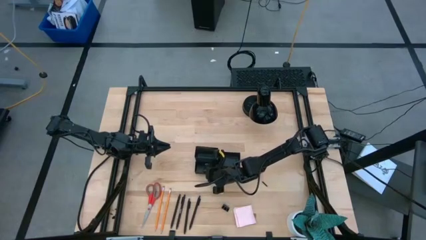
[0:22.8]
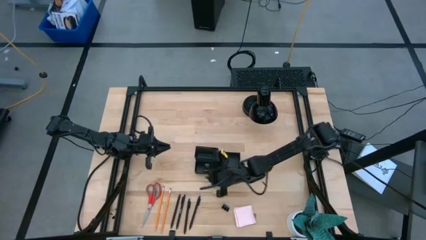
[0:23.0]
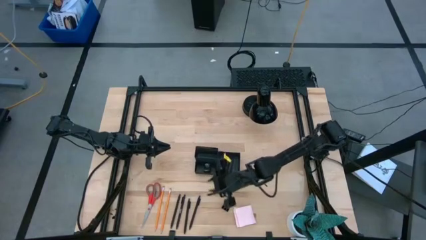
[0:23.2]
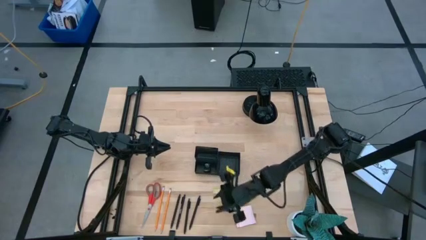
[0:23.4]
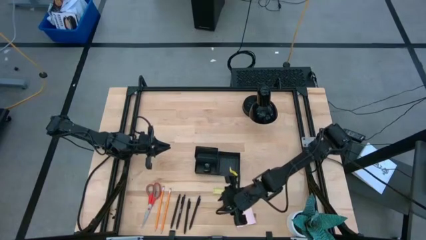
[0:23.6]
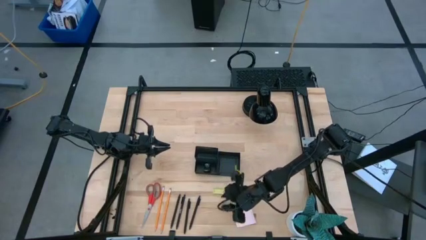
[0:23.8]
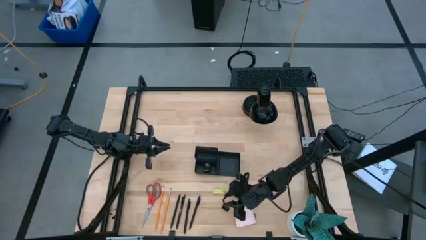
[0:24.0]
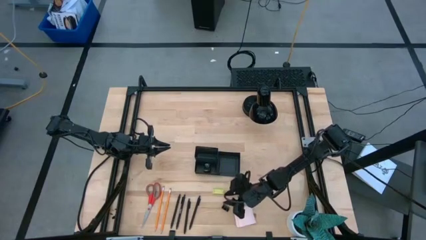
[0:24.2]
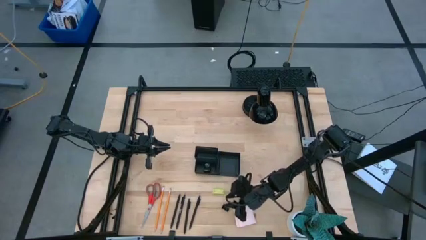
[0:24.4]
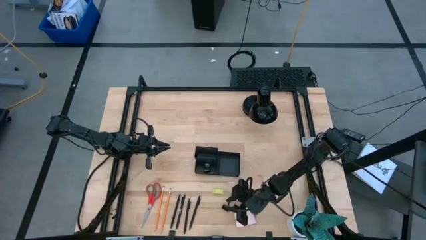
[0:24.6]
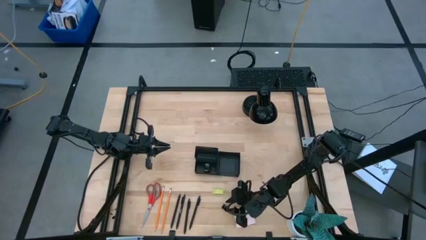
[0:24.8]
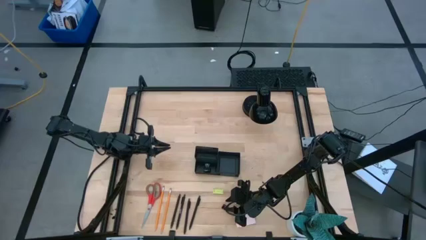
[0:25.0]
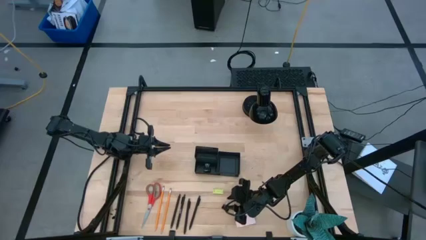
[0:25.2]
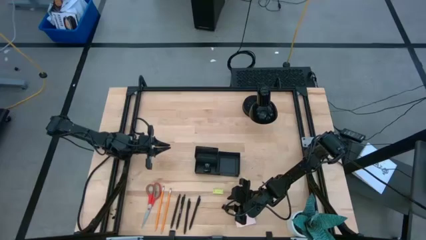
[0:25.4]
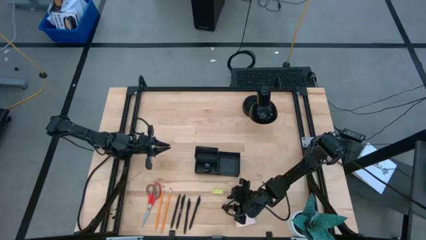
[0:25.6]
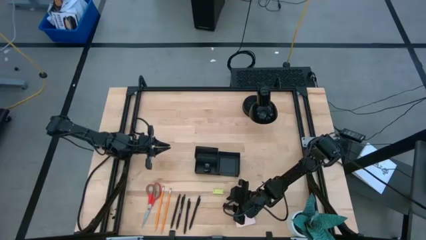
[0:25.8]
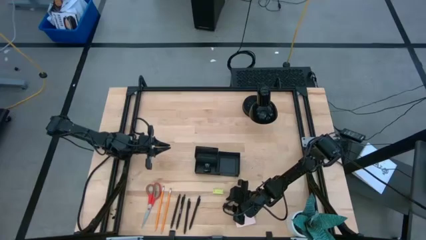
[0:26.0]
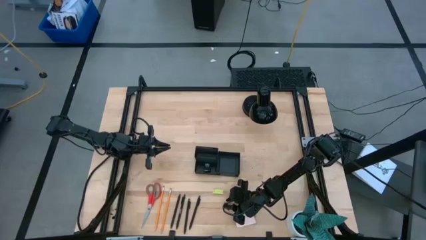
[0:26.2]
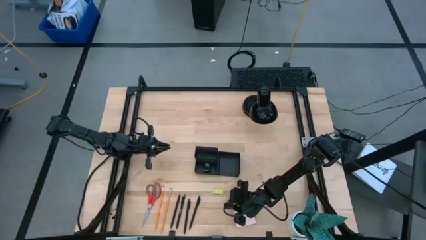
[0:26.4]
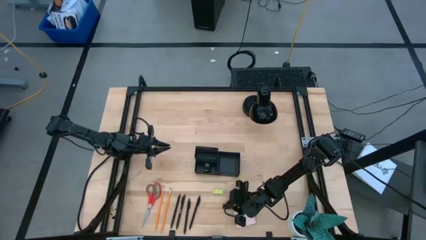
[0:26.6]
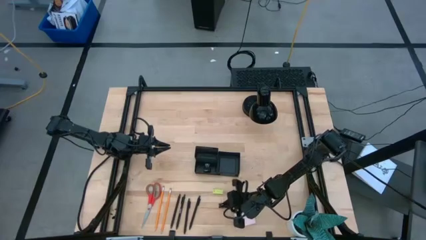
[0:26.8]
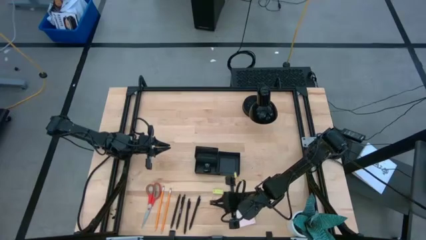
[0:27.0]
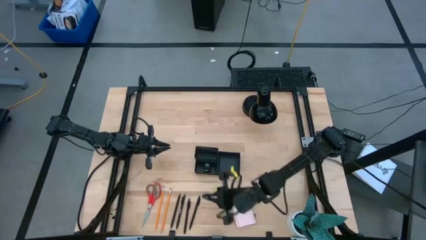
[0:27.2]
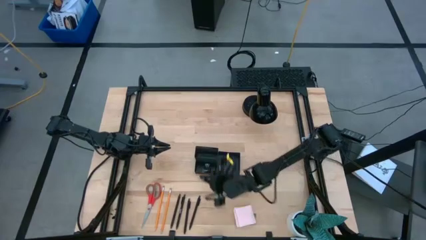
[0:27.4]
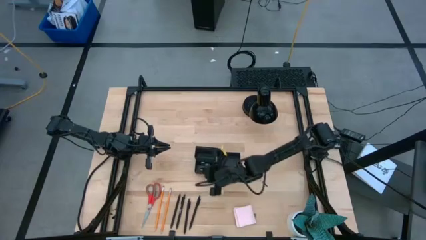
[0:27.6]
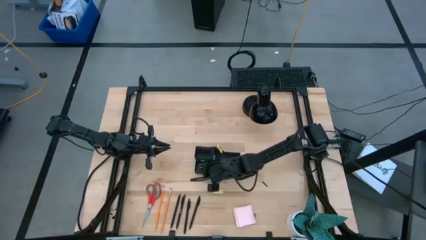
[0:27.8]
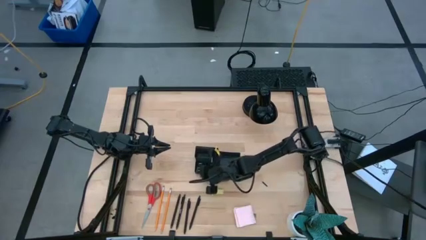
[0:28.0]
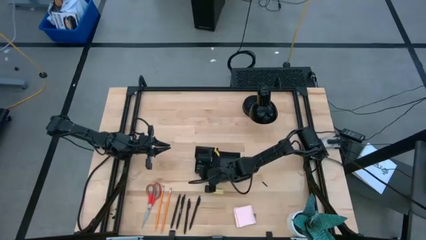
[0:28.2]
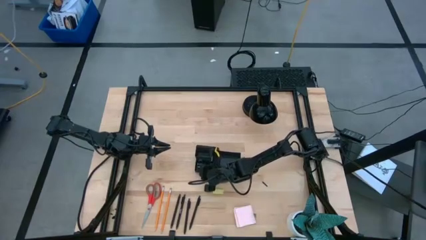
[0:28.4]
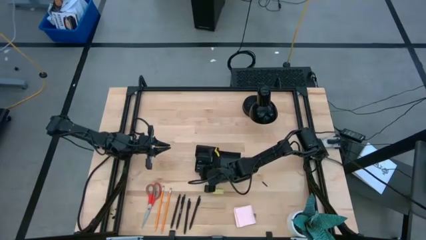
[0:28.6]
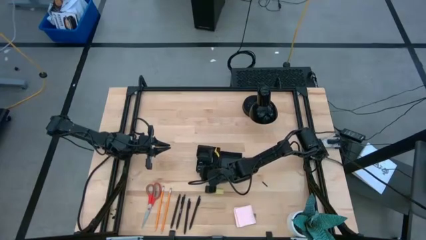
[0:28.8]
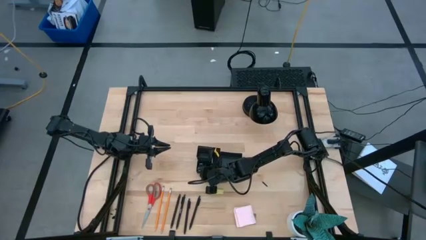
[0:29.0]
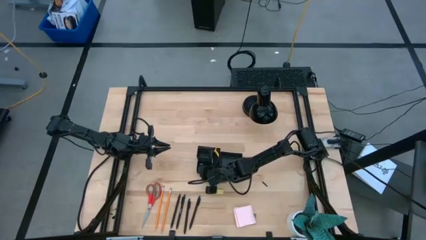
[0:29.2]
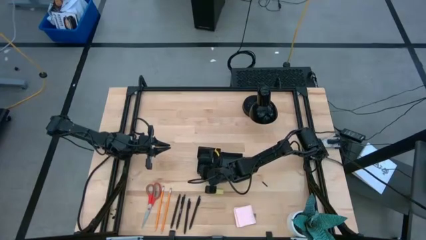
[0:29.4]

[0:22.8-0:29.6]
Task: Pick and place office supplies into organizer
Put the black binder clip into the black desk organizer

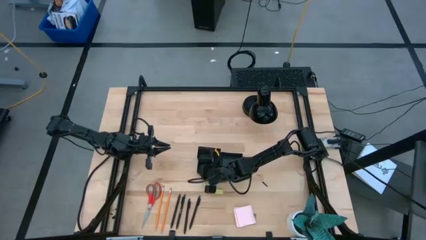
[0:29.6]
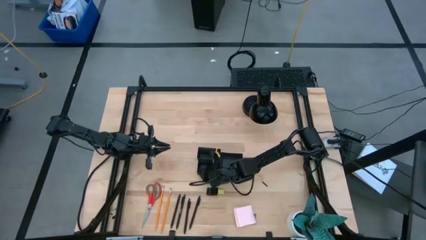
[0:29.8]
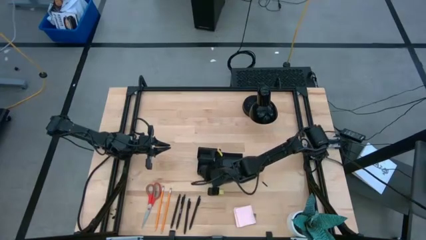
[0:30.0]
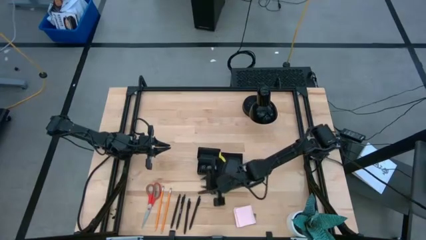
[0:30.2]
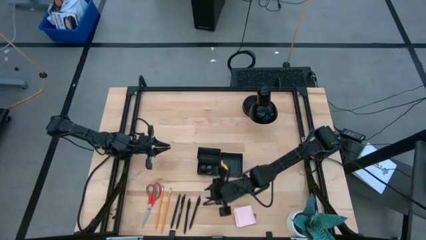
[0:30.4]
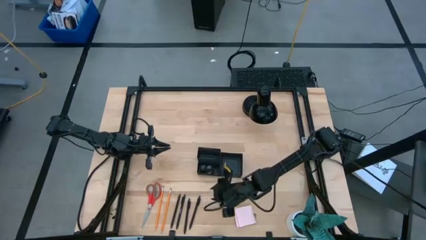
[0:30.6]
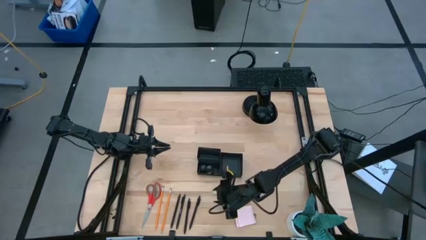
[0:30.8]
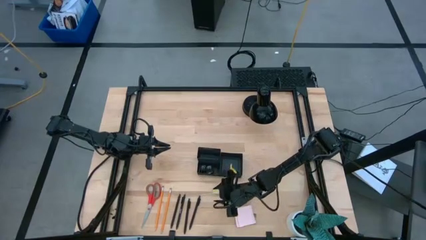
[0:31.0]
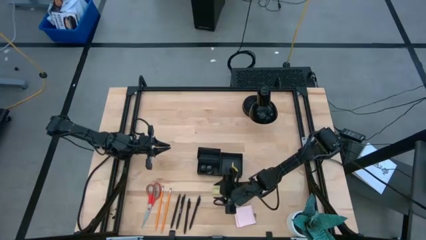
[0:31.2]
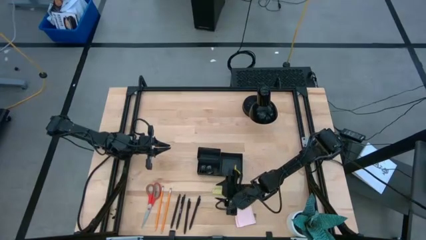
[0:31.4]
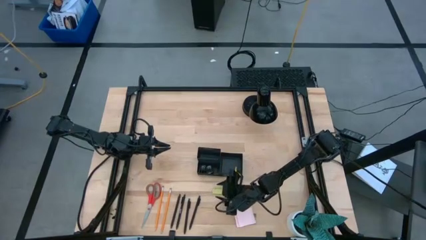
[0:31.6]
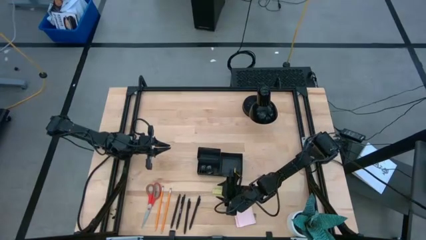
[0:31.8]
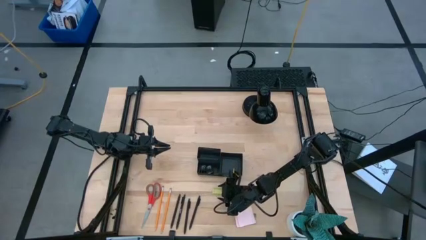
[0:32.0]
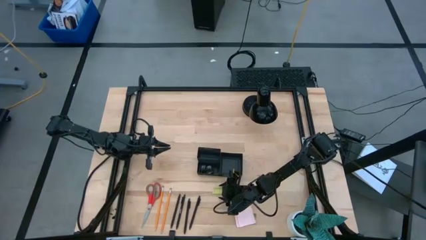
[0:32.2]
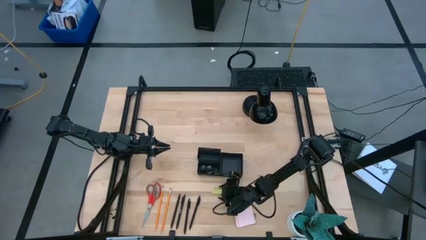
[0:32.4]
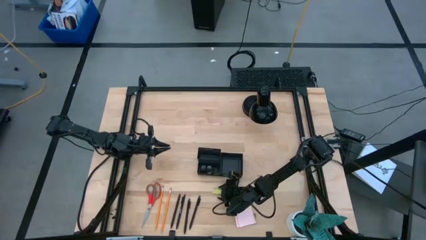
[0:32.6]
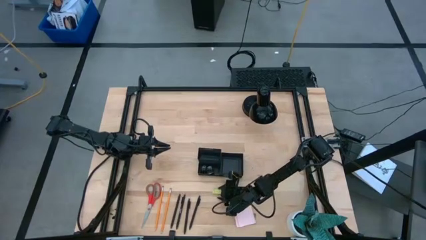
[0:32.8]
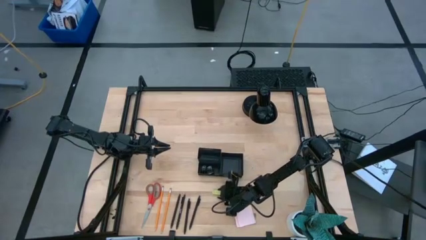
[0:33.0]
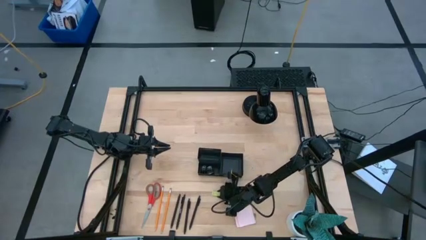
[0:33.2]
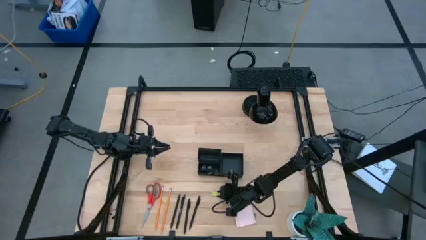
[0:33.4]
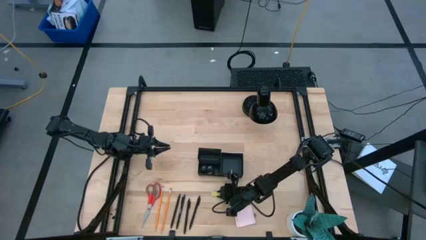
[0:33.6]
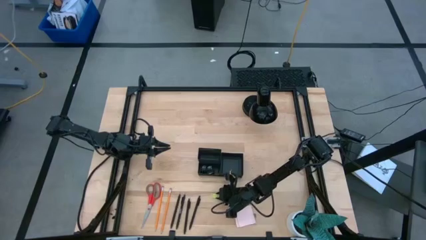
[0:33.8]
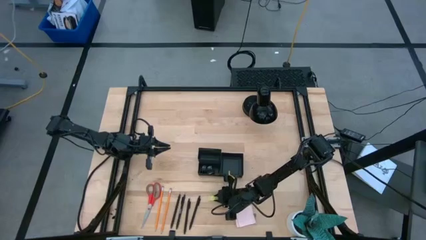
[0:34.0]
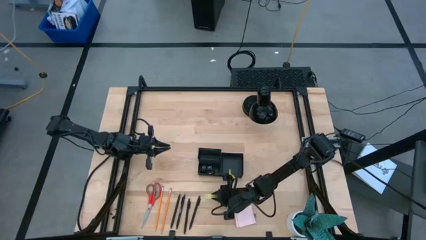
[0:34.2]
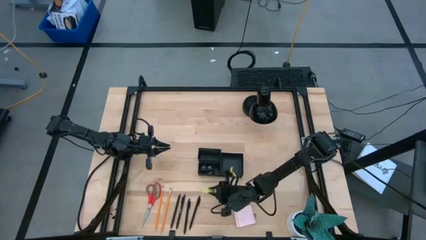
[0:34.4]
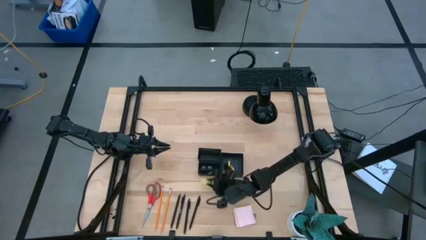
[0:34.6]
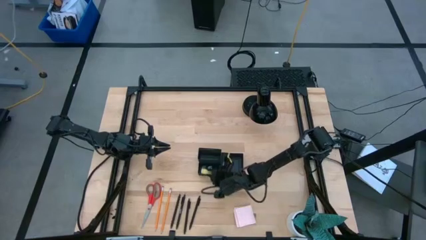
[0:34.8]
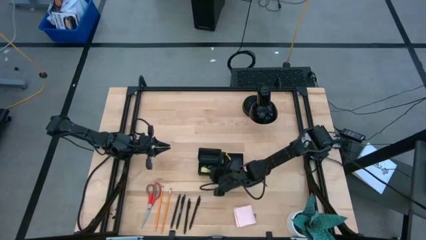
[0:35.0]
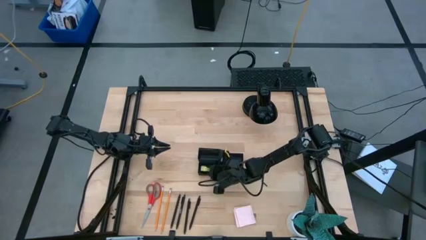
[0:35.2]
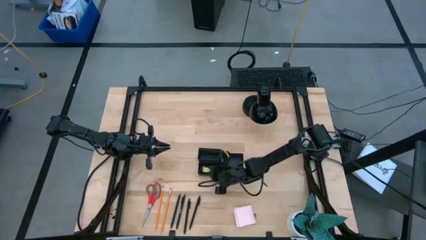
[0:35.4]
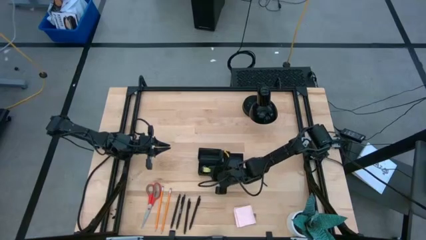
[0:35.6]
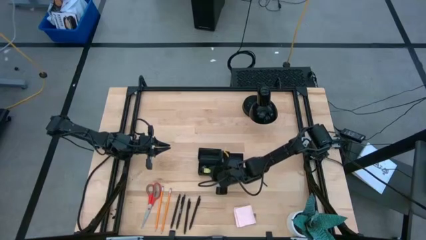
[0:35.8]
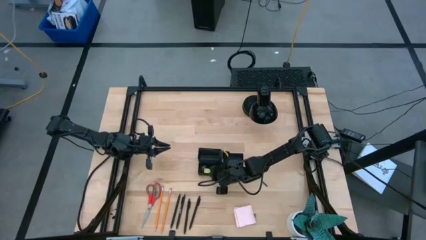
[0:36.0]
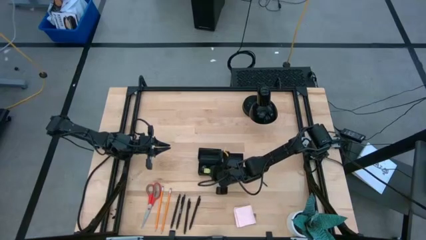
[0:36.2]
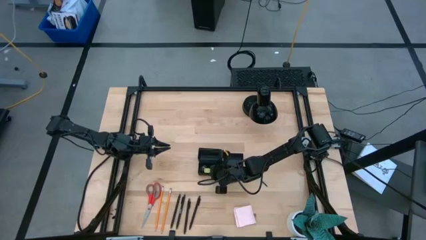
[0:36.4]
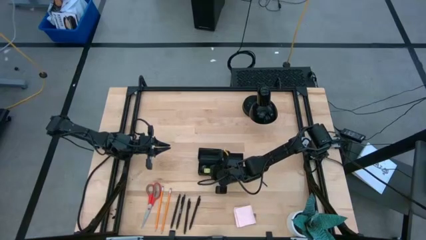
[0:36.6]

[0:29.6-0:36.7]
Put the yellow eraser into the black desk organizer
